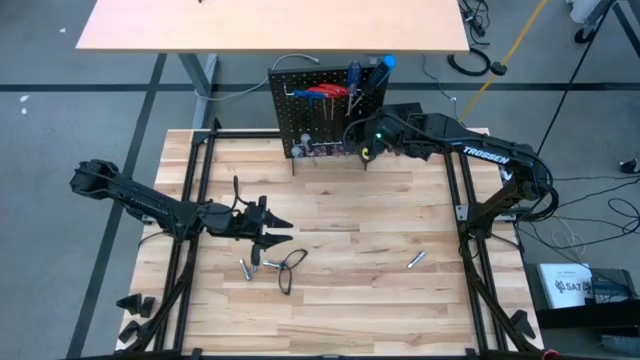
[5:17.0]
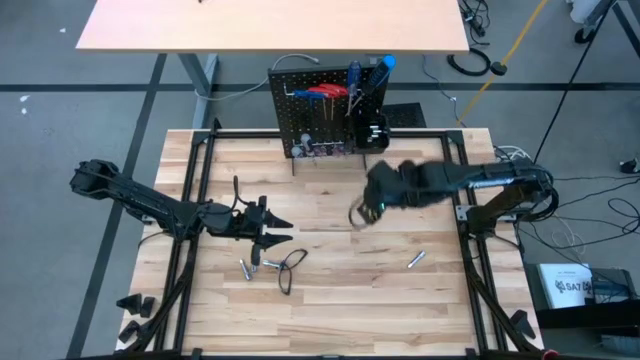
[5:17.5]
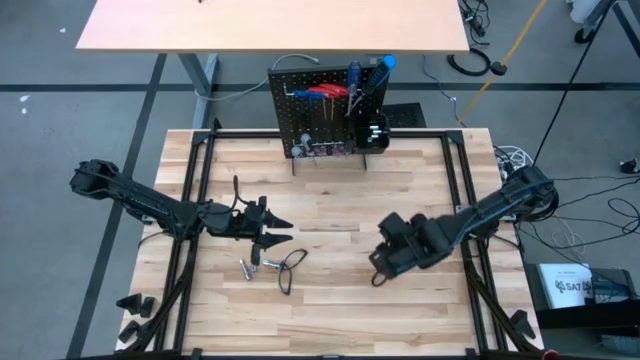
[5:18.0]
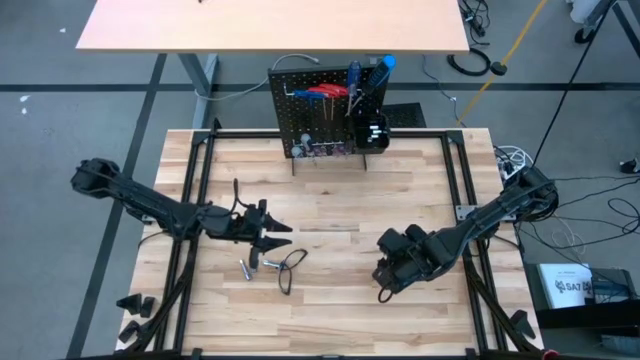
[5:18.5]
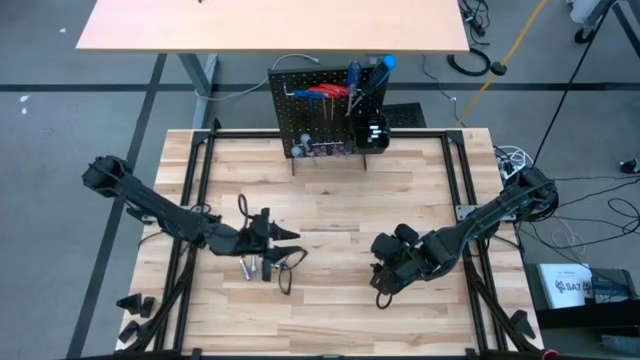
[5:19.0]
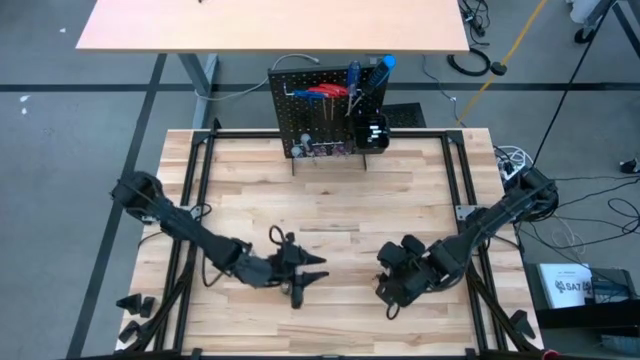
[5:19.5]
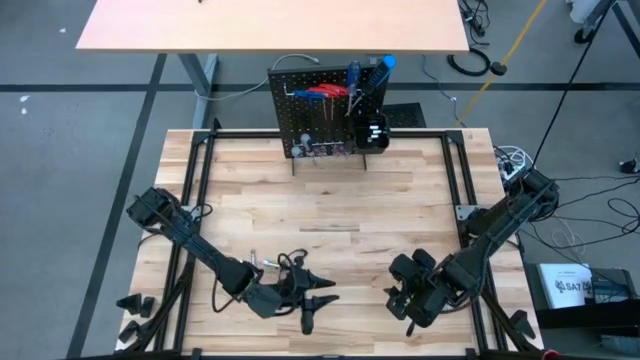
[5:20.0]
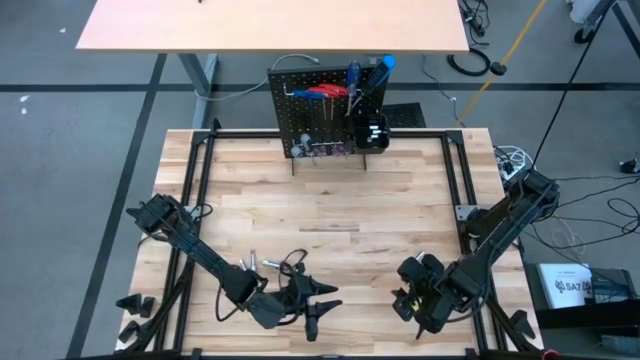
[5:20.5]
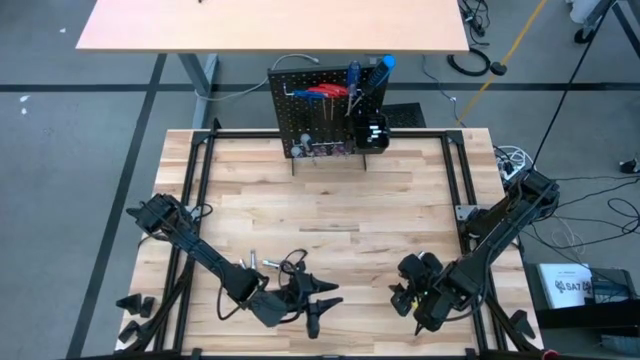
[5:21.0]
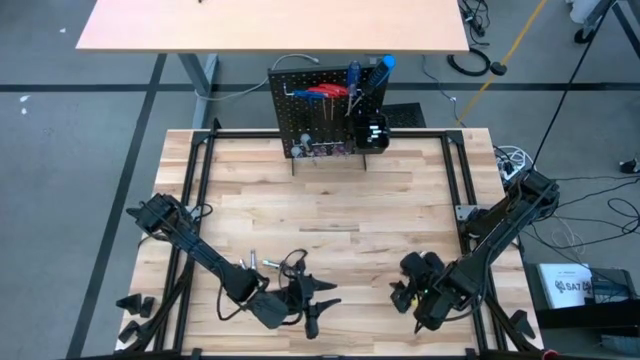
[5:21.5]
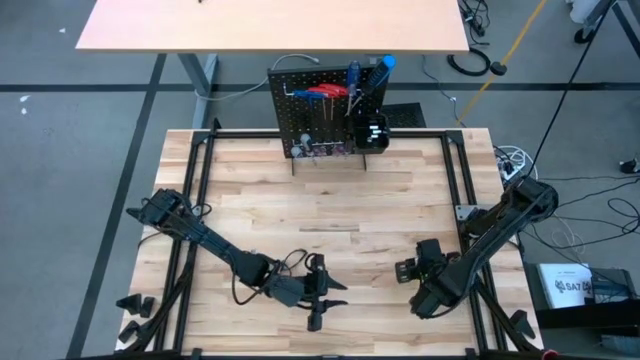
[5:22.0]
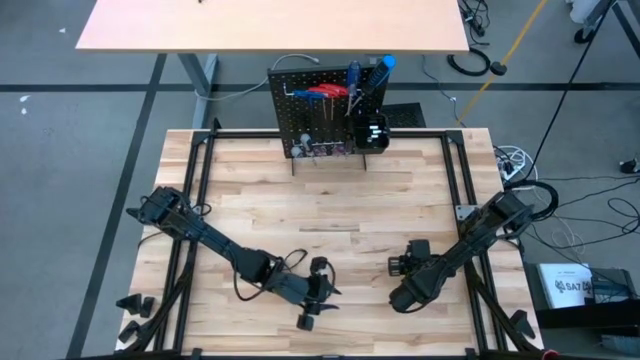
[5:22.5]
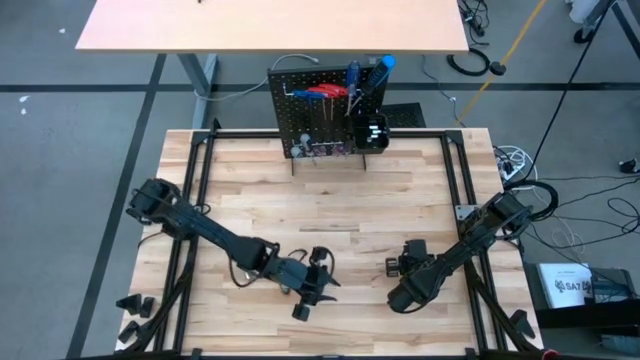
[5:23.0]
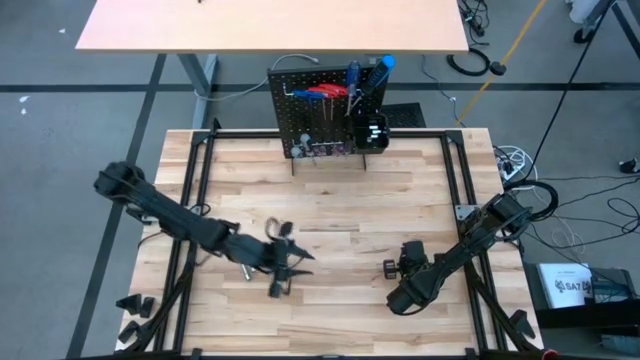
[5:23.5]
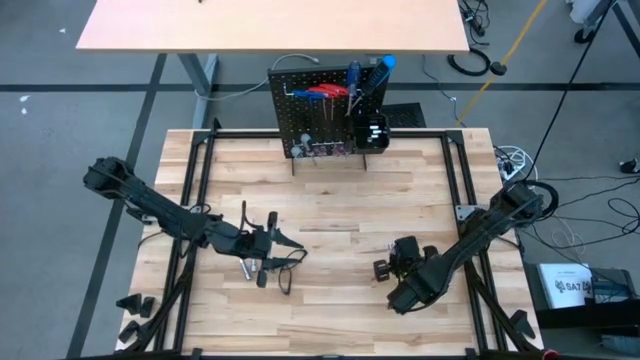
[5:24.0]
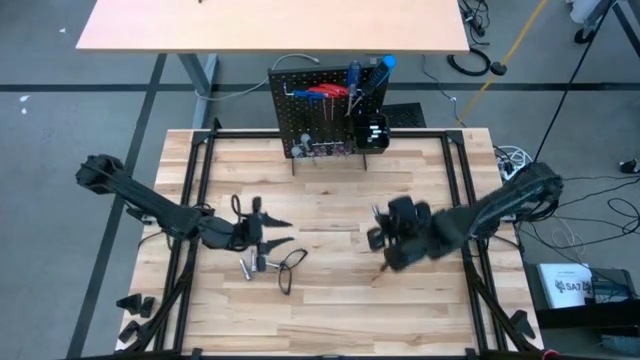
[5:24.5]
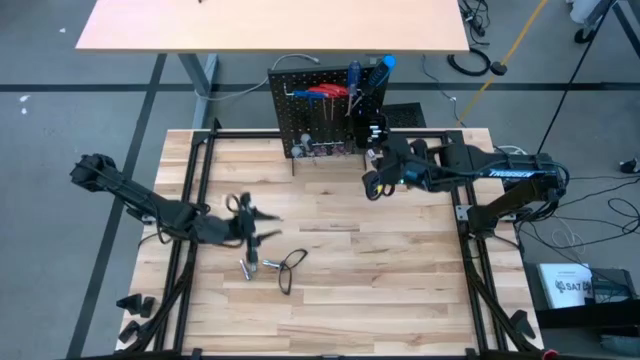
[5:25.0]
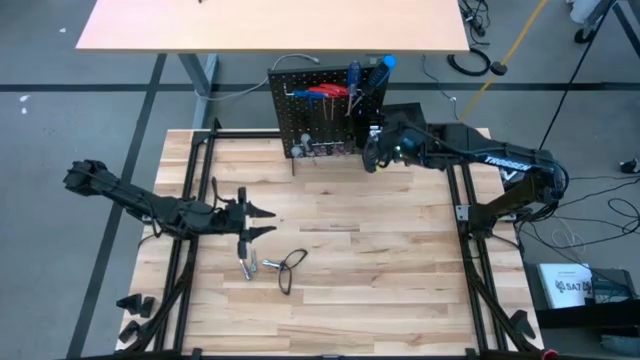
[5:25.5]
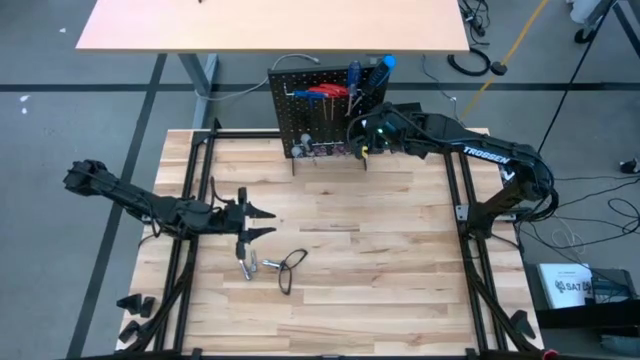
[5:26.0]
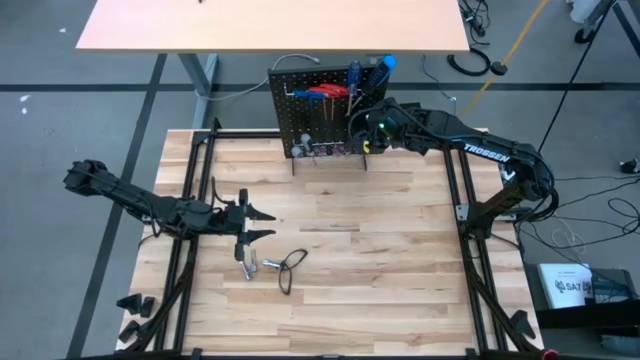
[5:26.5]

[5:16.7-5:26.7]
Task: Hang tools onto peg board
Put the extension bar into the black bin on the peg board

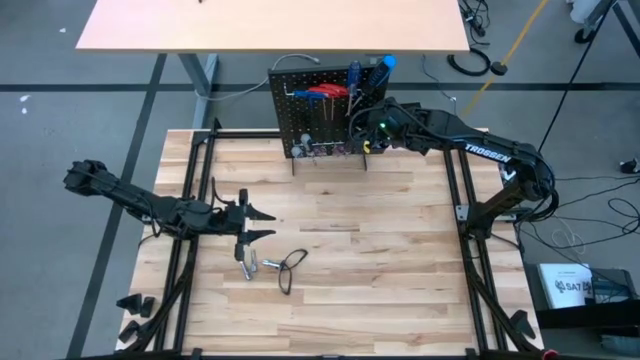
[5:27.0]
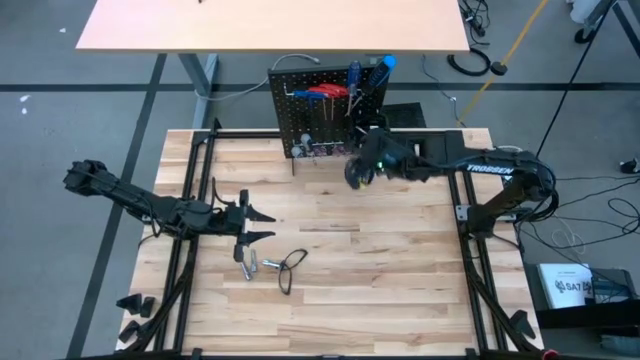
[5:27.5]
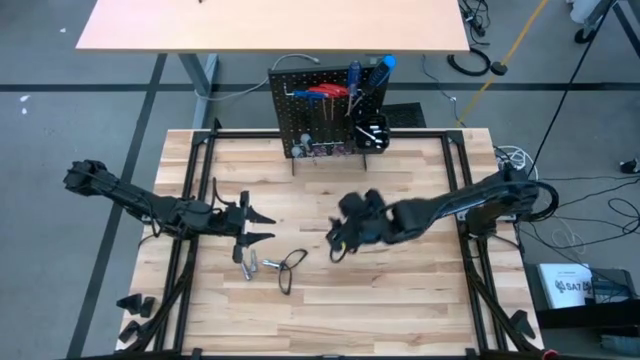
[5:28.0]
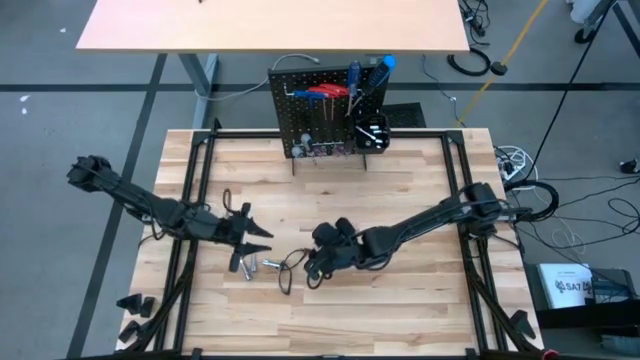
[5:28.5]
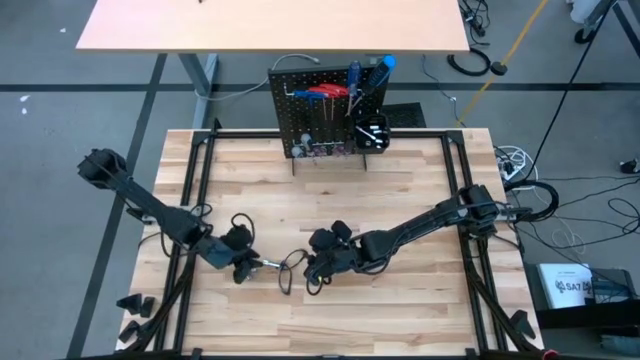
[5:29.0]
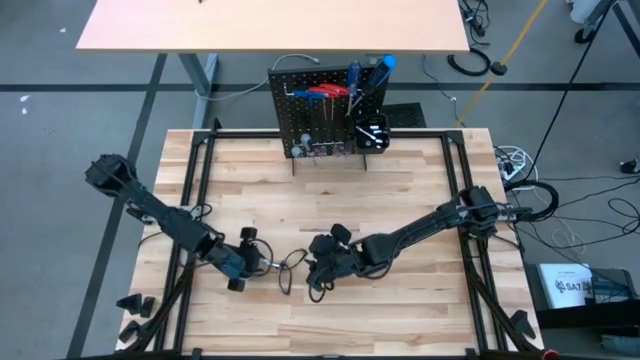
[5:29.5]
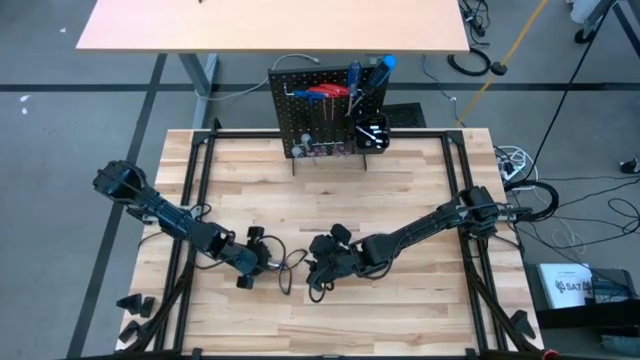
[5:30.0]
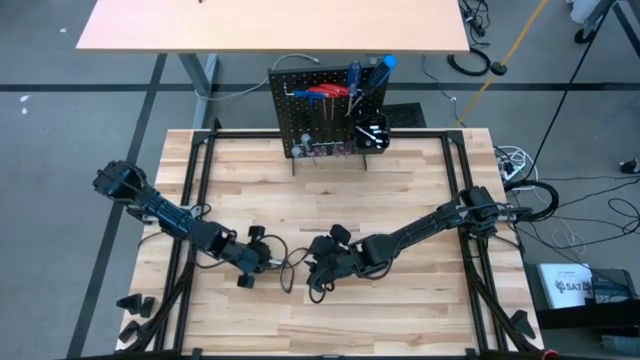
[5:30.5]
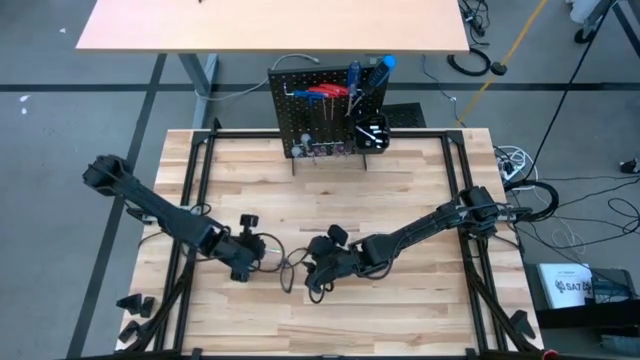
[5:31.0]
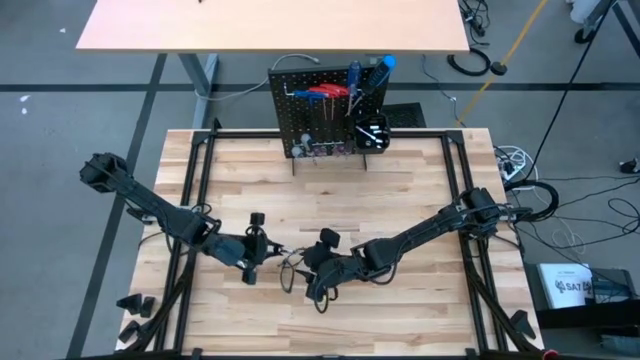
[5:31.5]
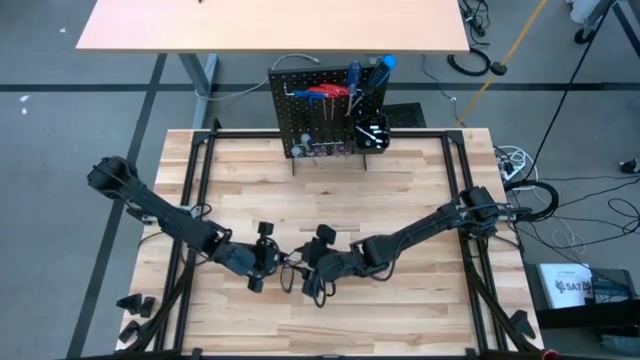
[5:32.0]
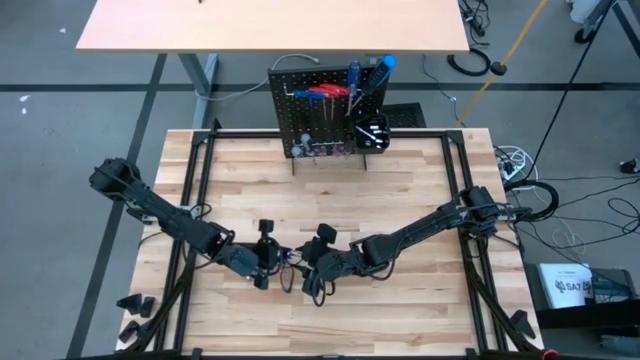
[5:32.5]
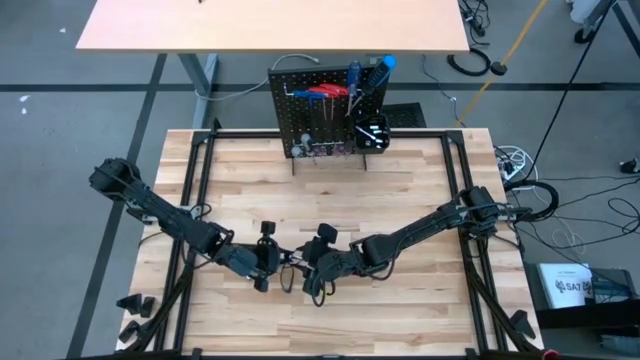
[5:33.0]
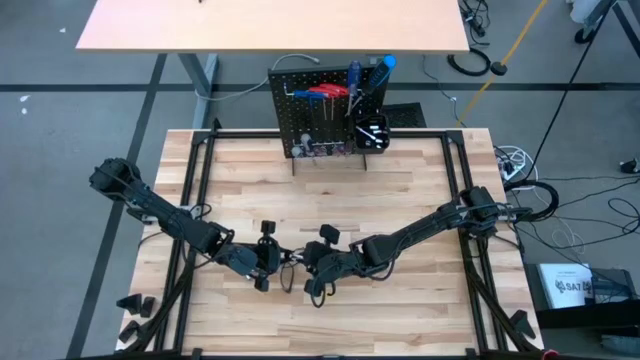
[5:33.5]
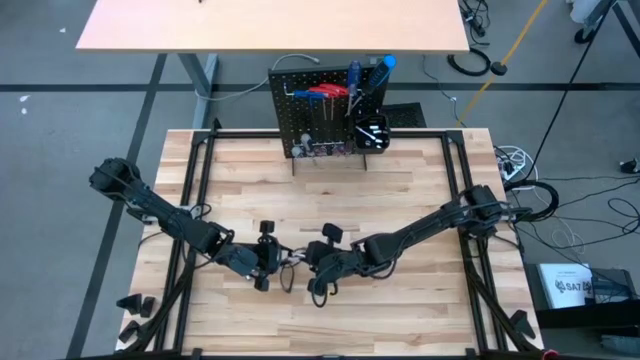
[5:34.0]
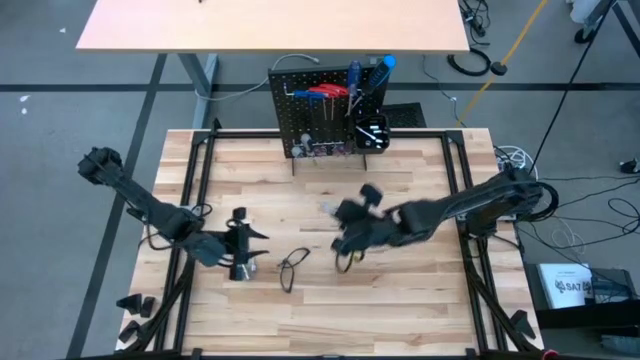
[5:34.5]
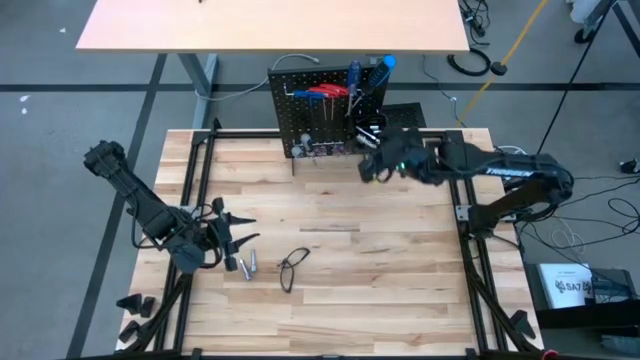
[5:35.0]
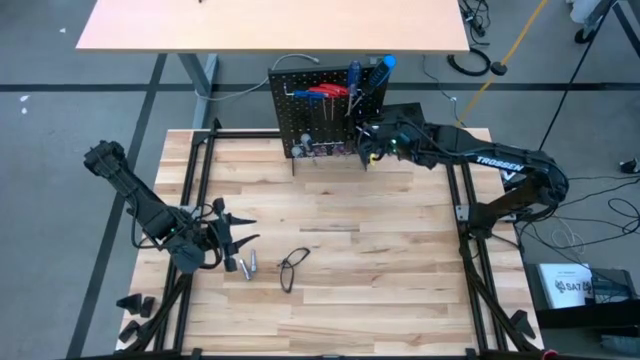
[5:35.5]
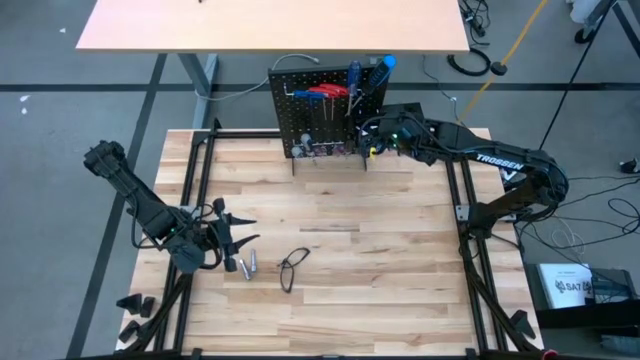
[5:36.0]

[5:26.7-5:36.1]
Put the right extension bar into the black bin on the peg board

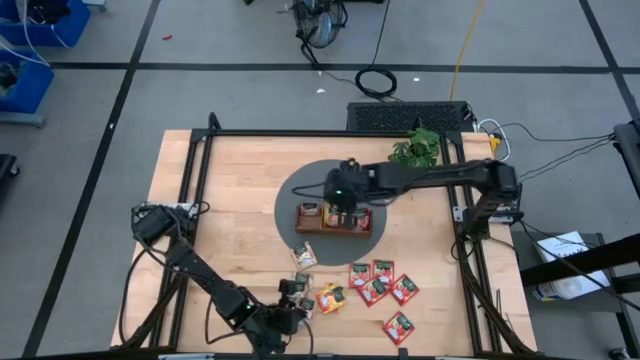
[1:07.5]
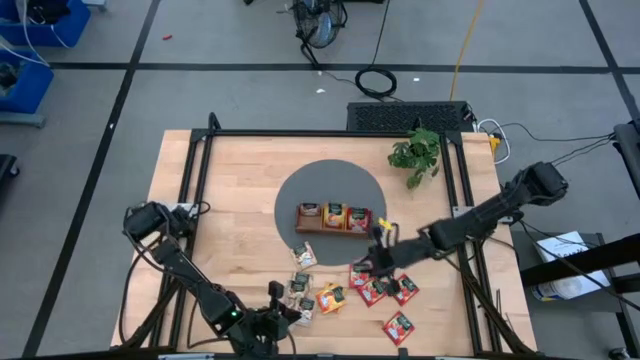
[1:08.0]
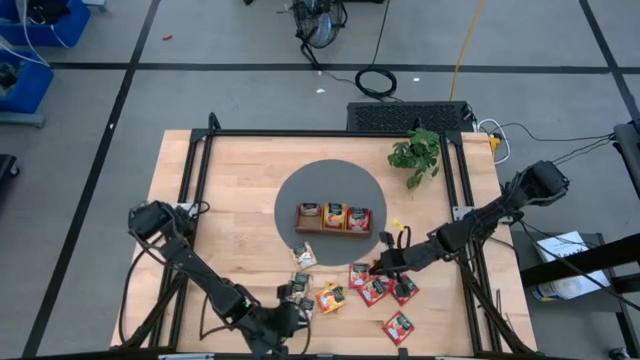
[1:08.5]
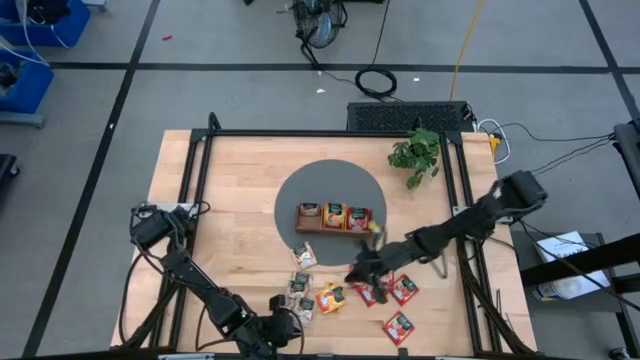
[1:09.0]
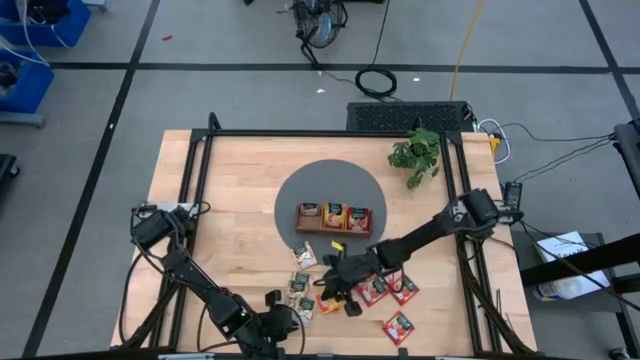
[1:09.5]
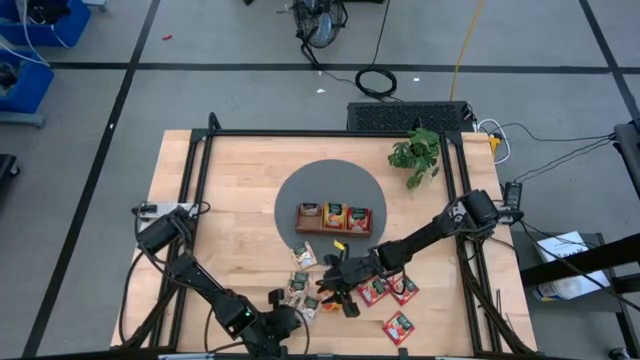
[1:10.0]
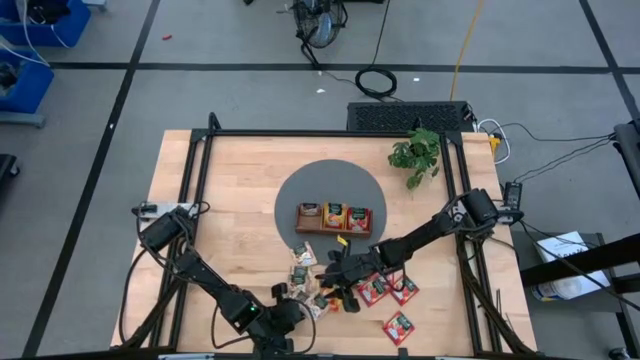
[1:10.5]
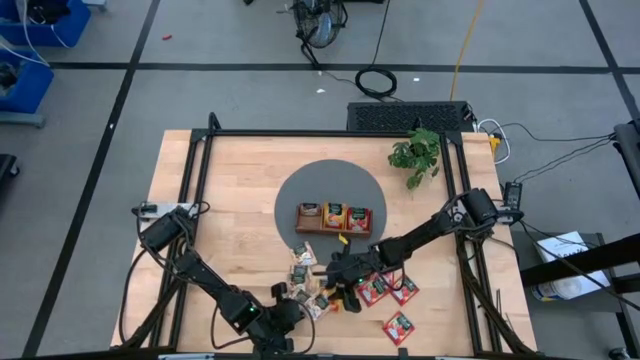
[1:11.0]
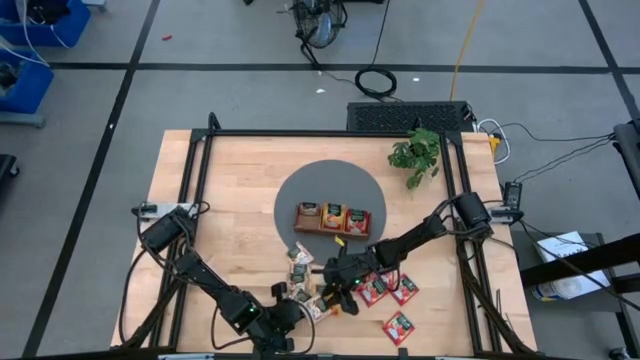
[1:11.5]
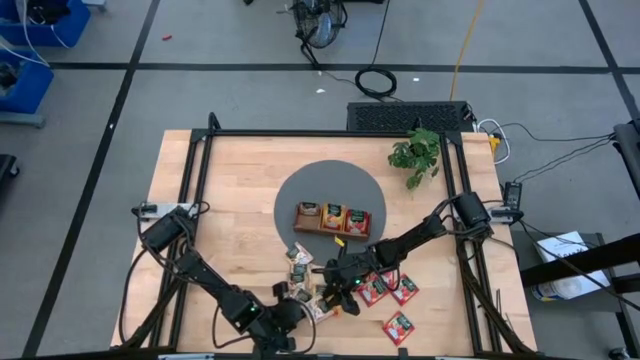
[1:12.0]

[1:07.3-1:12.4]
Task: Pick & Place Tea
Put the brown tea bag into the left section of the wooden organizer
